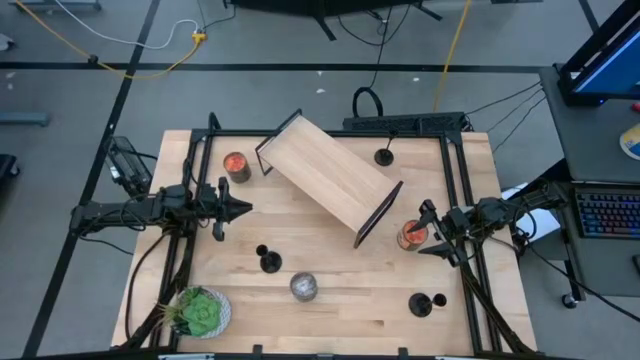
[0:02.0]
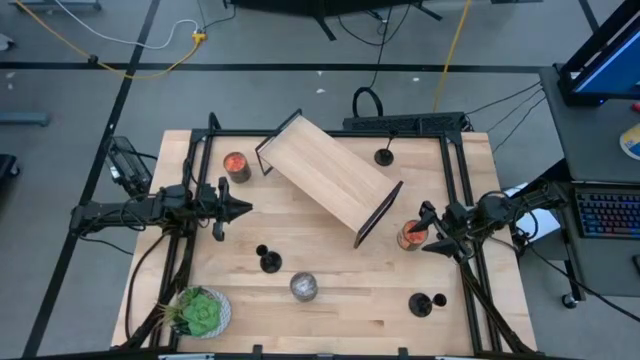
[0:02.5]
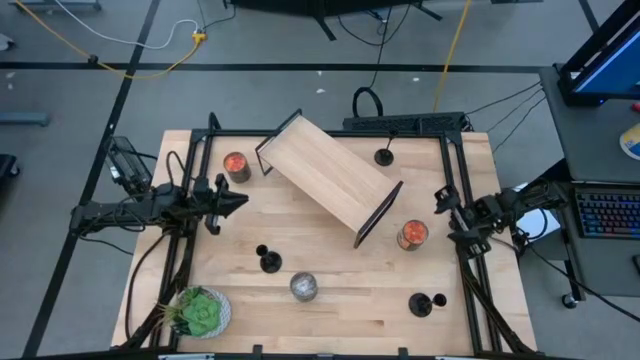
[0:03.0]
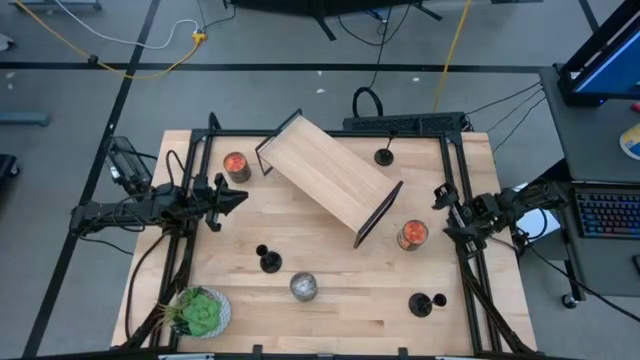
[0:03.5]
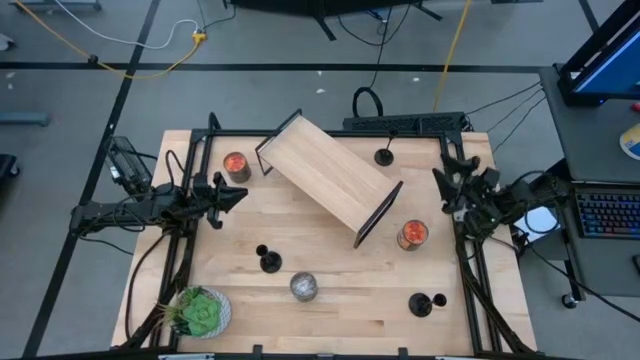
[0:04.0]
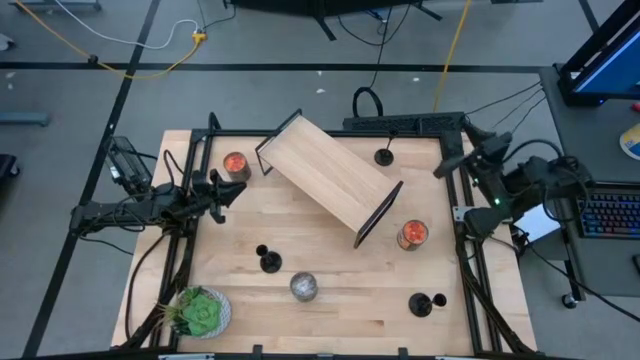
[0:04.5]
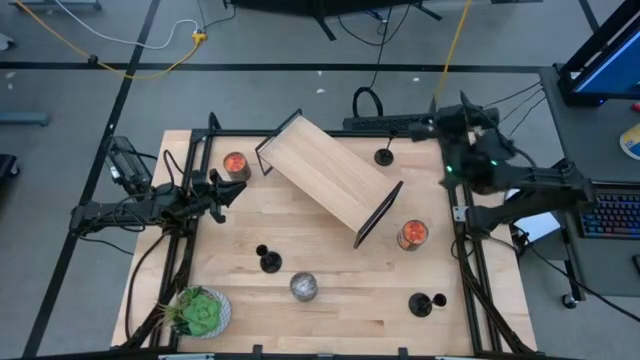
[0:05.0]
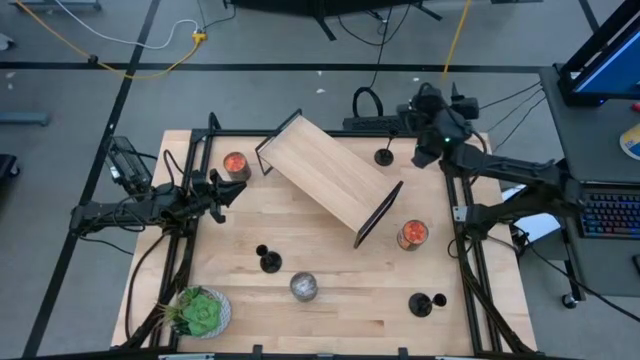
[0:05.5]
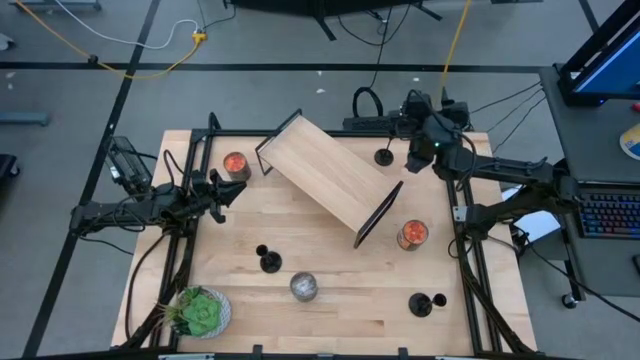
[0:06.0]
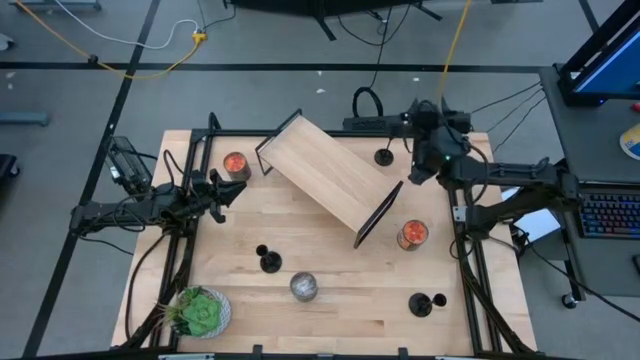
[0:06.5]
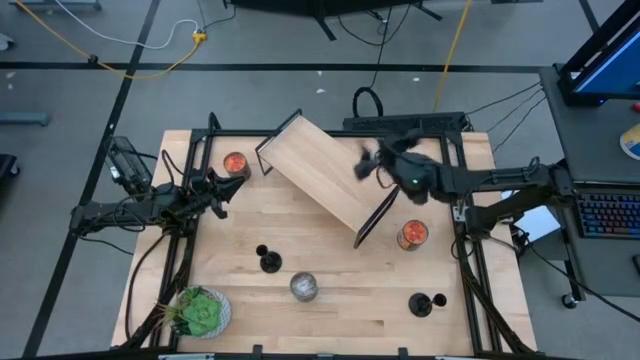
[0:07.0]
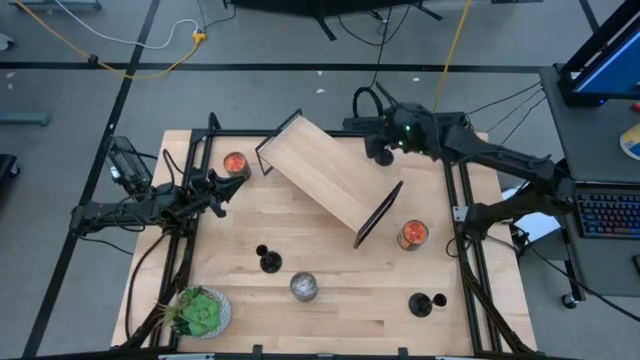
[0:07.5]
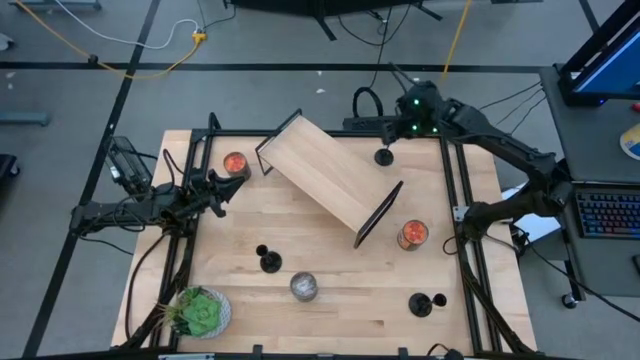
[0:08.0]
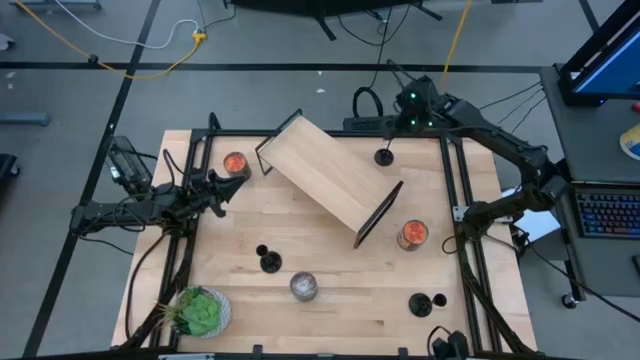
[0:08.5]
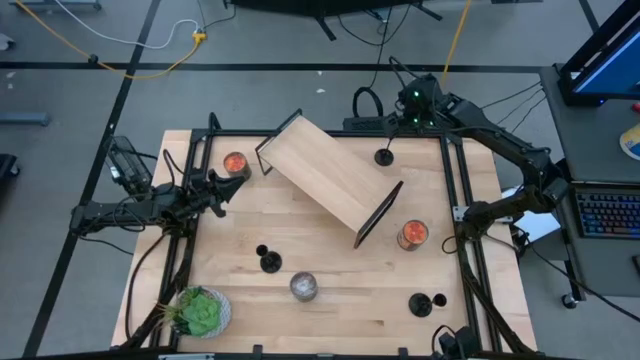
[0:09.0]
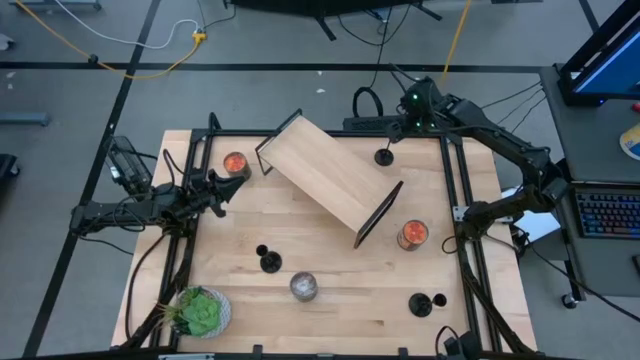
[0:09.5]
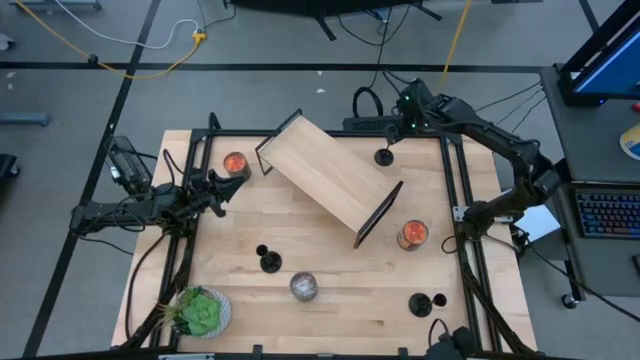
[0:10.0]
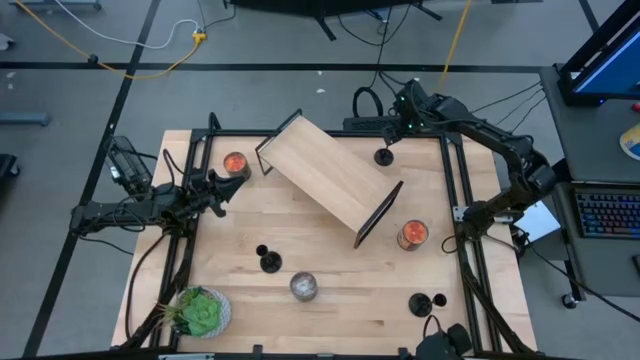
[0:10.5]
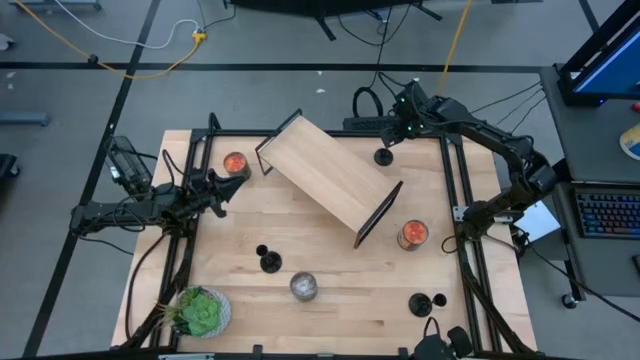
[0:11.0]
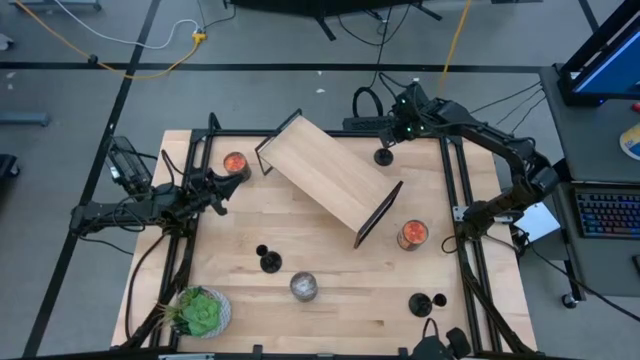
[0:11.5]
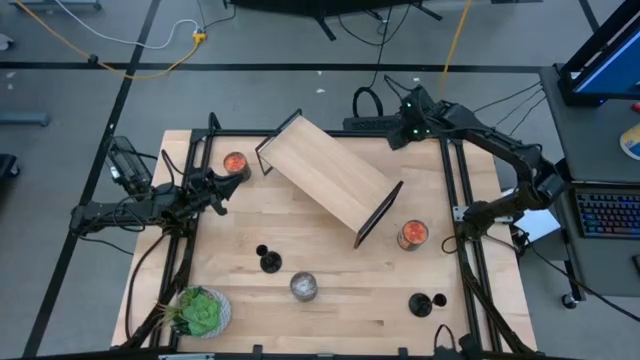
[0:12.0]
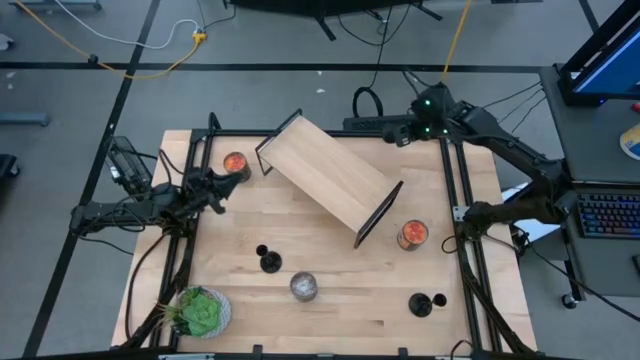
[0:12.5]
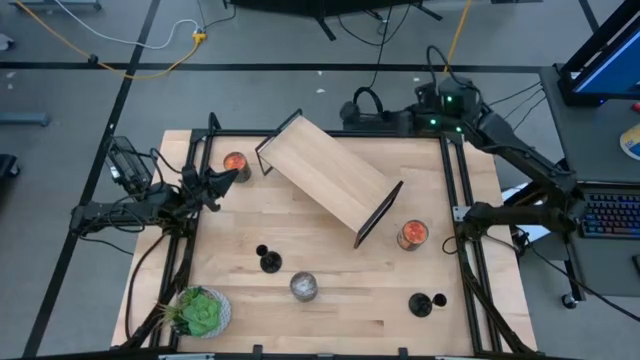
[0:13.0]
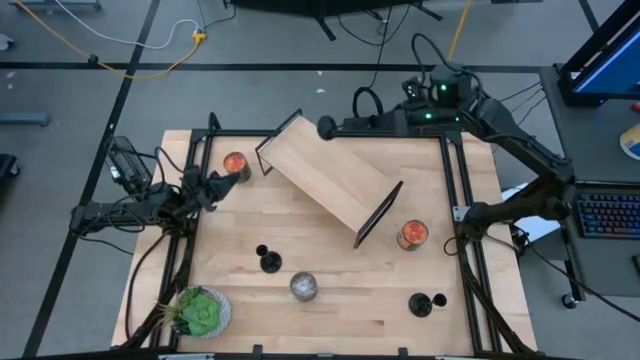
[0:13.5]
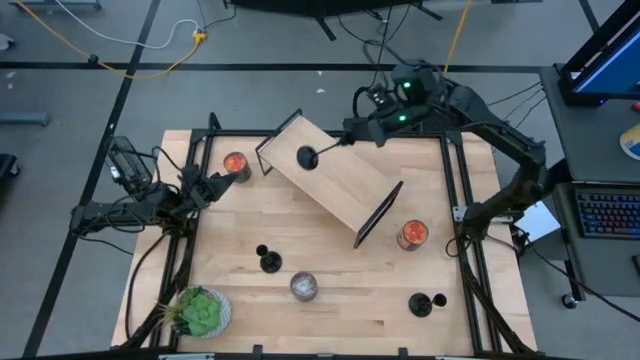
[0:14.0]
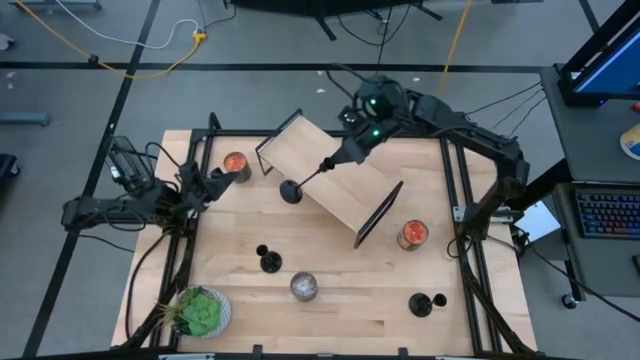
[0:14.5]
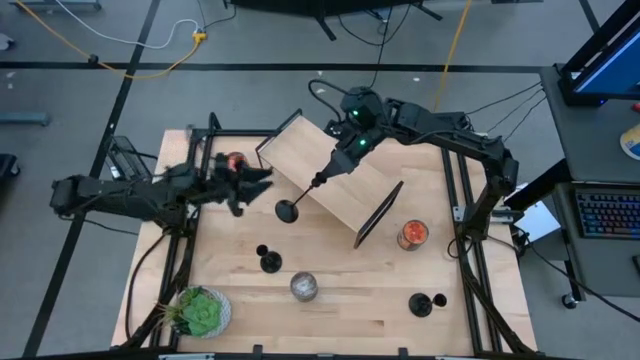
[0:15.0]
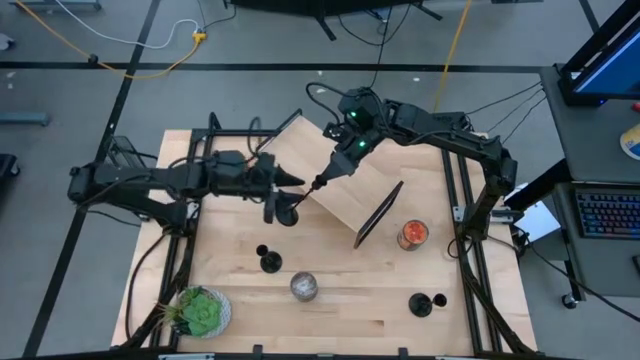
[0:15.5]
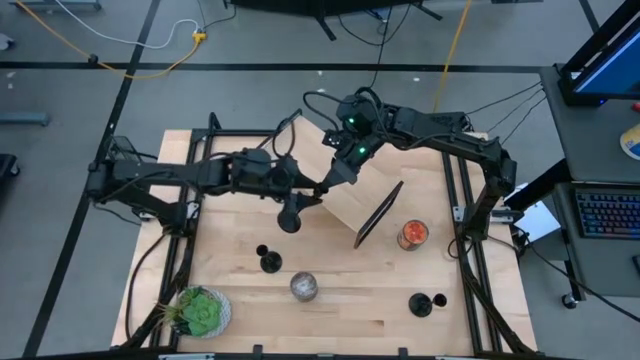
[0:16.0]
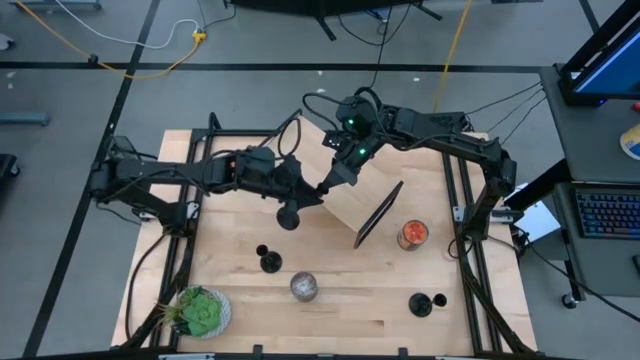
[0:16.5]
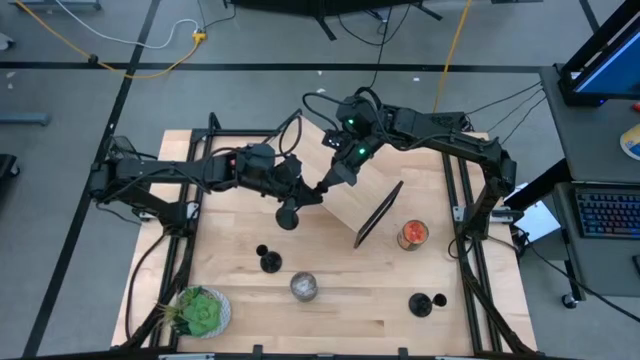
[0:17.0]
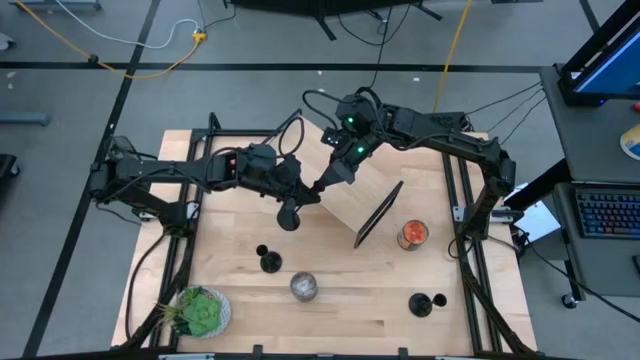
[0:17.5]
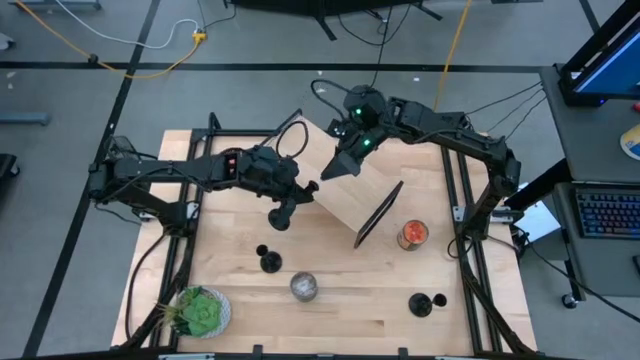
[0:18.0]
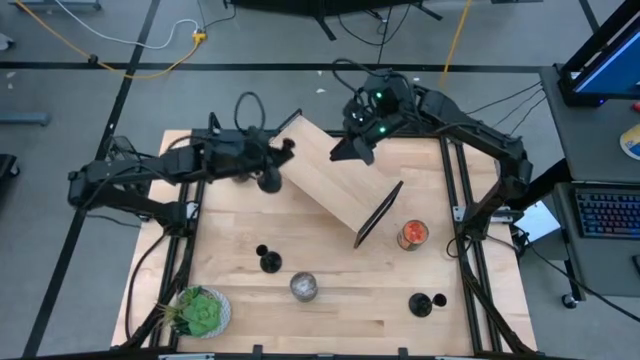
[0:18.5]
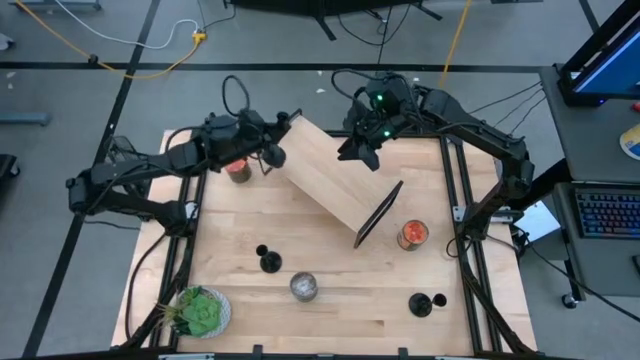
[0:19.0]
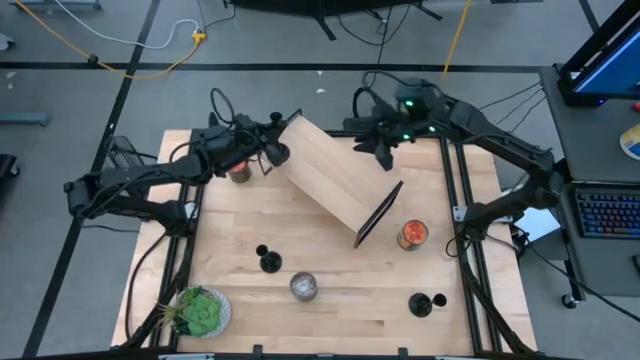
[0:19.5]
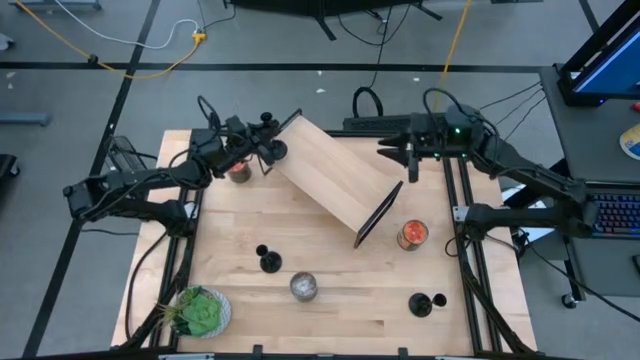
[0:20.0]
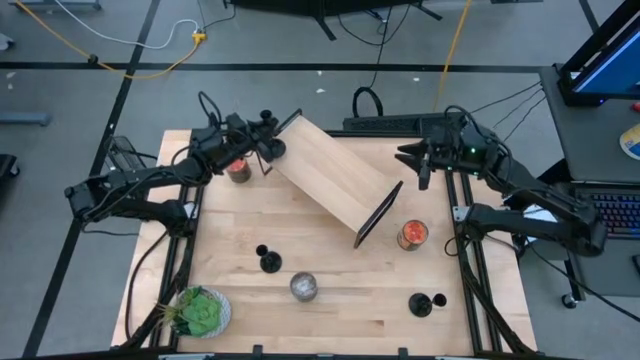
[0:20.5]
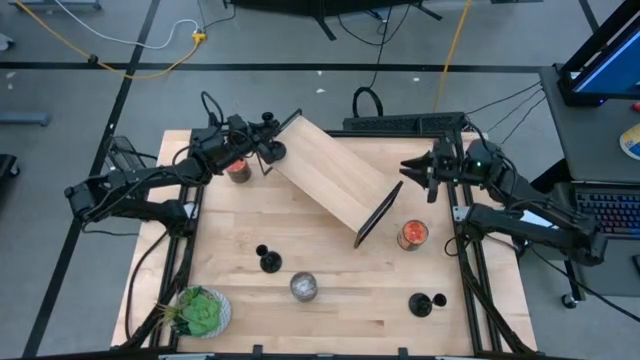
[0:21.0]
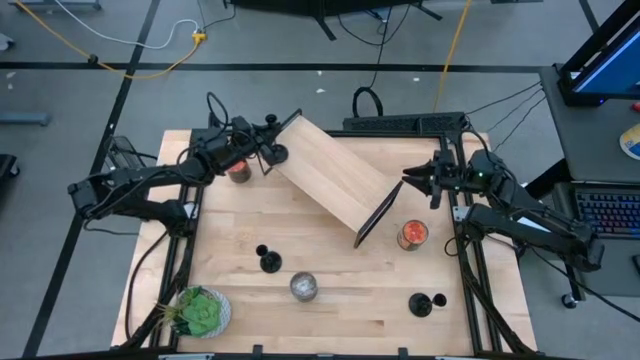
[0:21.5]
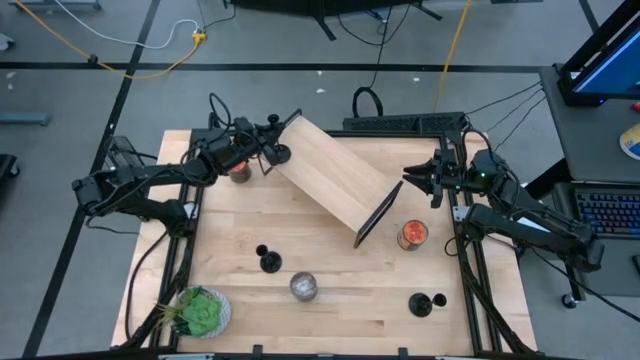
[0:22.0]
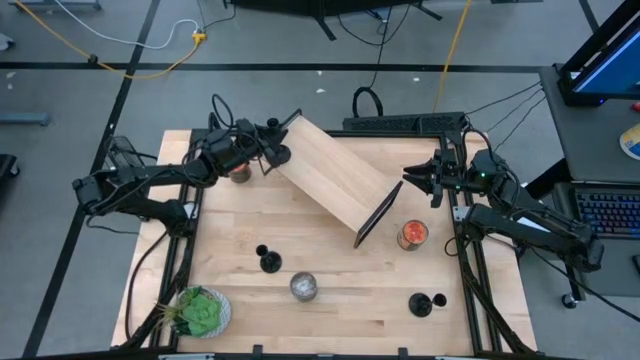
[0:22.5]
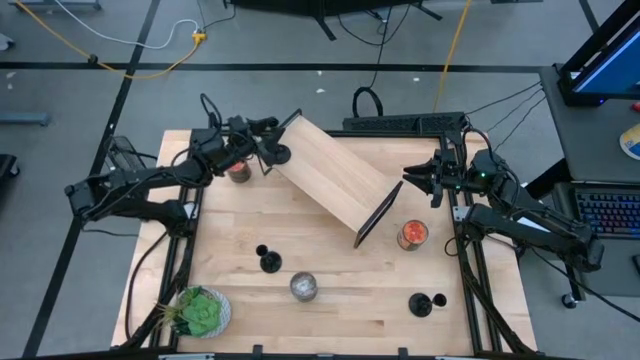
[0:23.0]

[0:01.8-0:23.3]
Task: Pick & Place candle stick holders
Put the top black candle holder on the shelf
